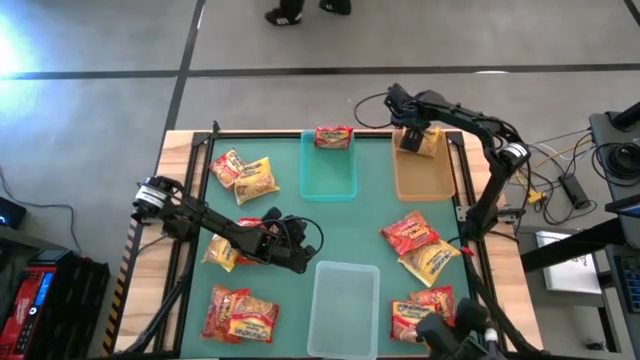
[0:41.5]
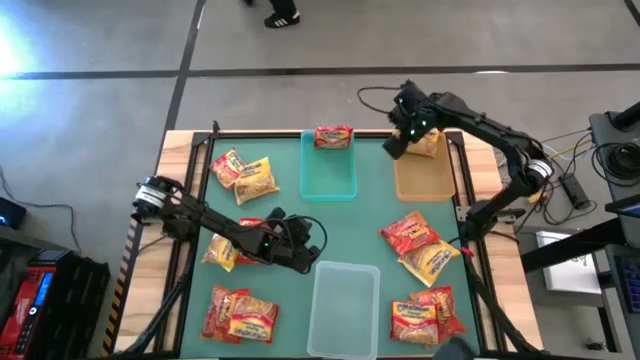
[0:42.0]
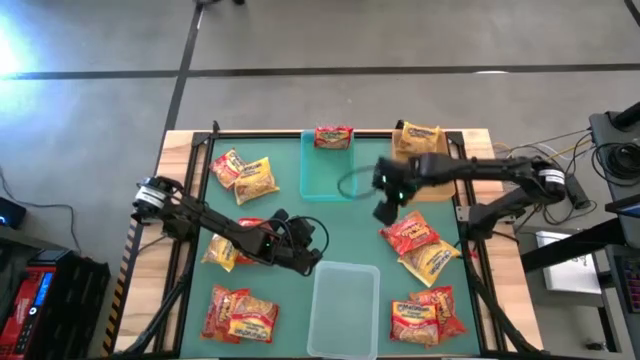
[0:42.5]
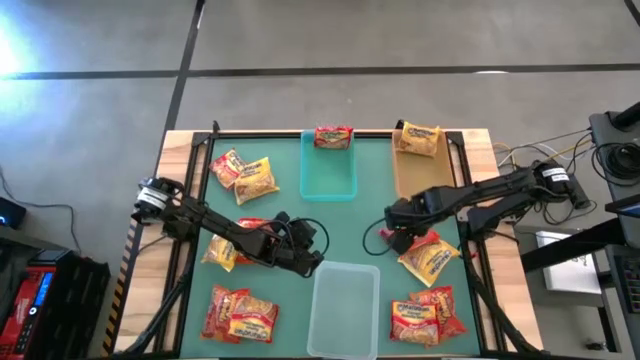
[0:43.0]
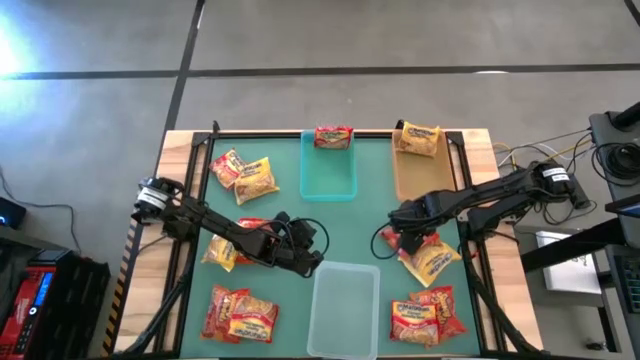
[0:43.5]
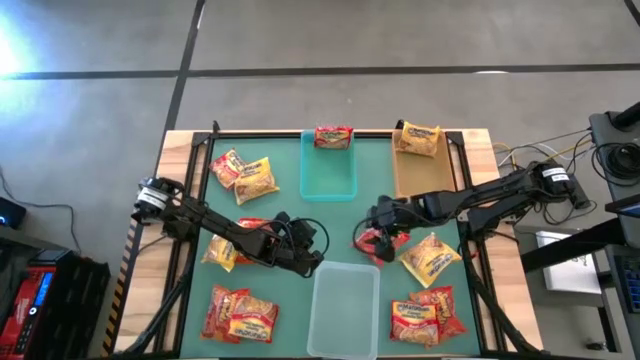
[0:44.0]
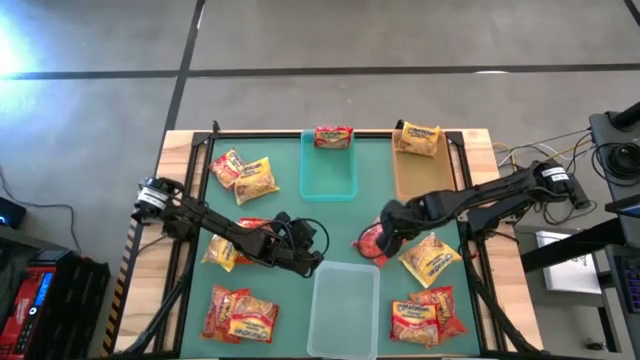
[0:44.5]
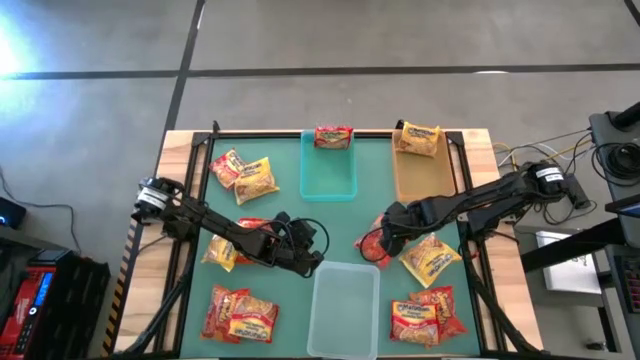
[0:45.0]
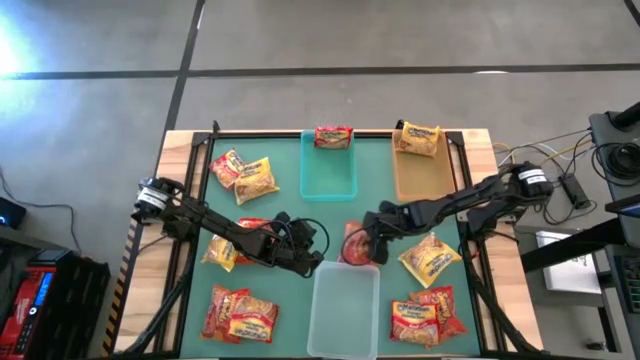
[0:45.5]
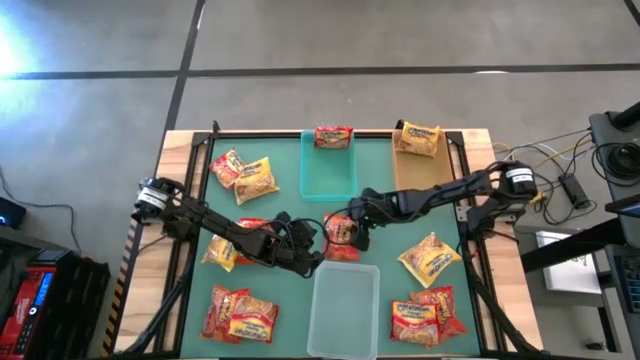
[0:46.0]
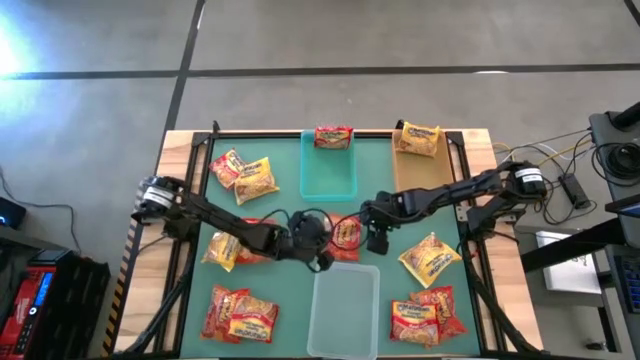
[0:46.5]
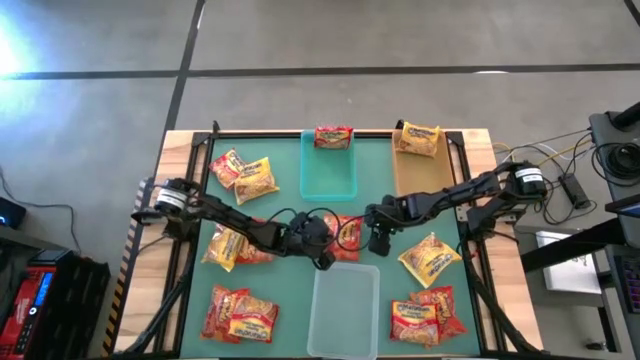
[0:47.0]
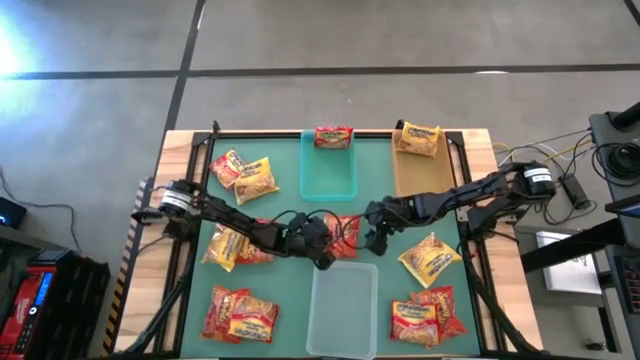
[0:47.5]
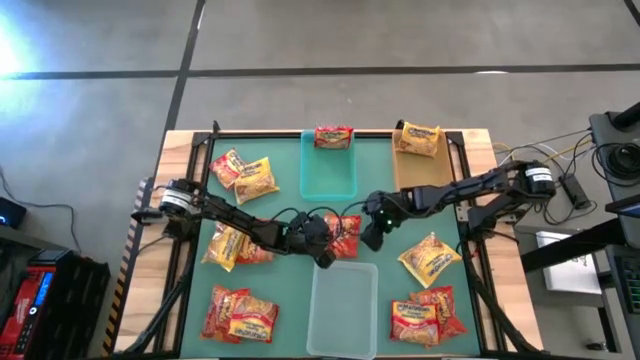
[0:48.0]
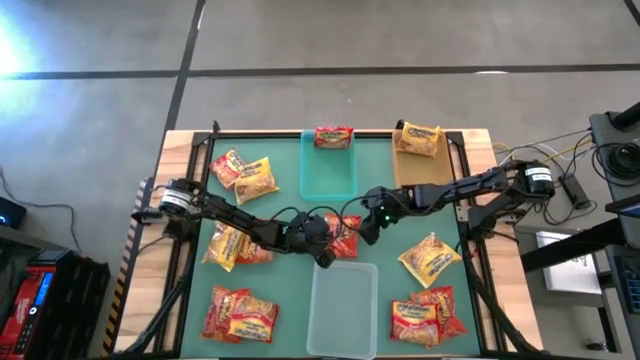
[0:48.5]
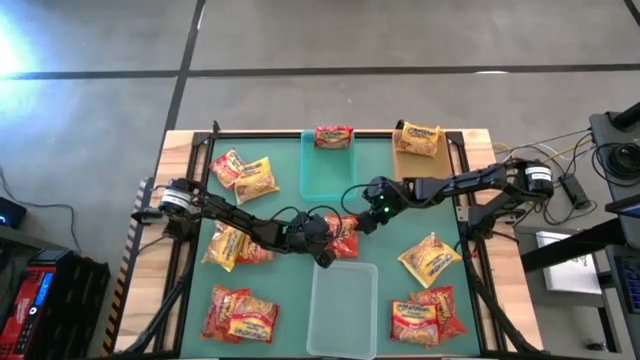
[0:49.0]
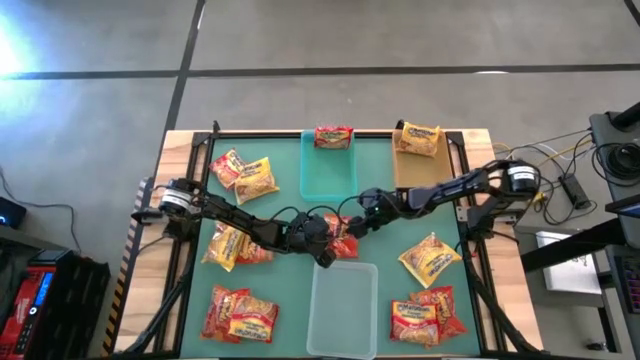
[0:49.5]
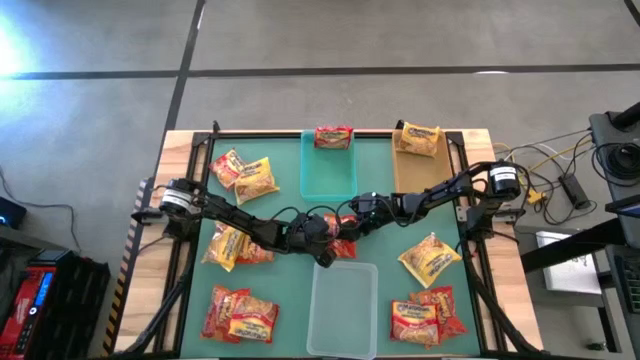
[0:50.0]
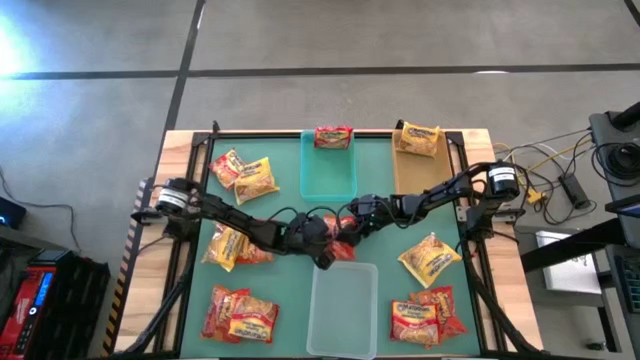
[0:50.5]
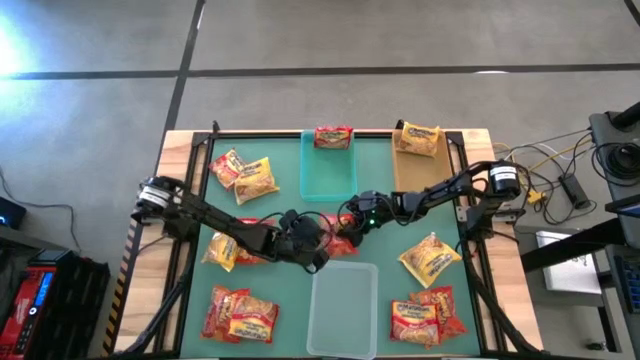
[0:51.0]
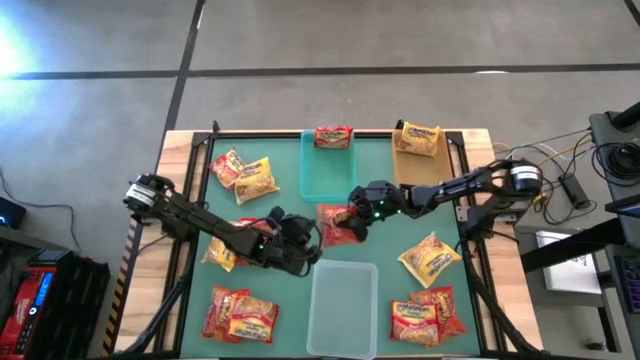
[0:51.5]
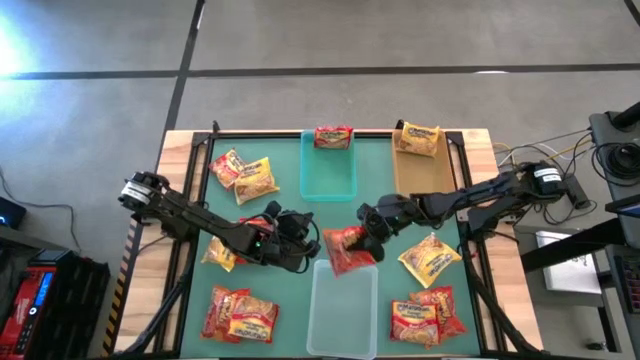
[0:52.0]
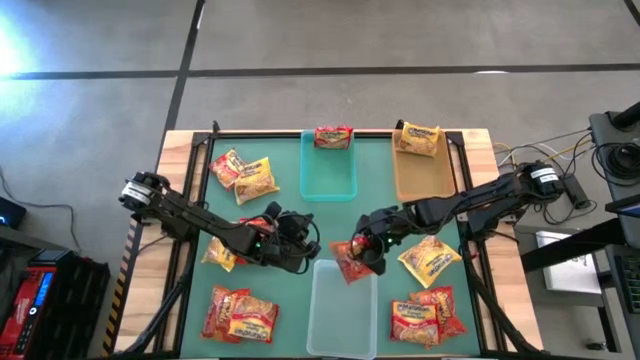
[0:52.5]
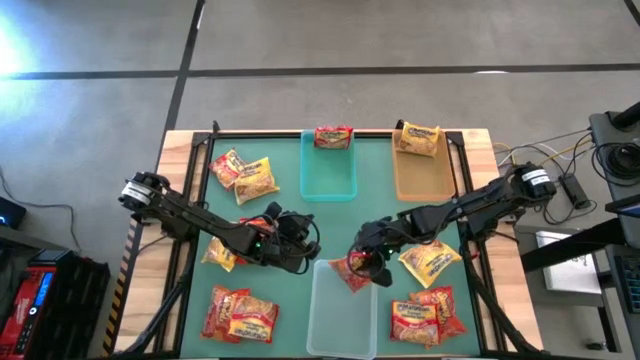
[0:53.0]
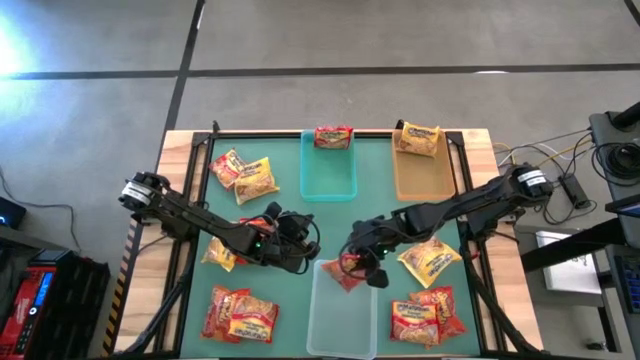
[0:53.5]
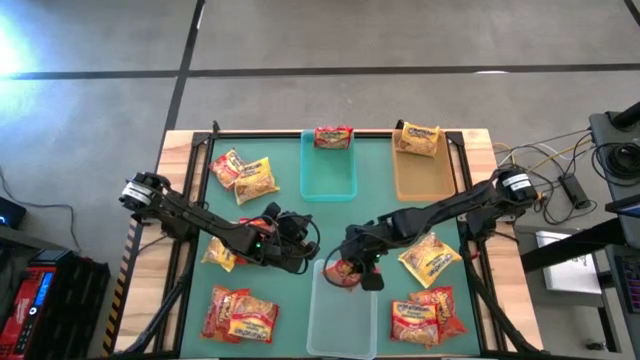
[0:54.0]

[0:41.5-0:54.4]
Task: Sort Maruchan noodles
Put the top right orange noodle pack into the transparent bin

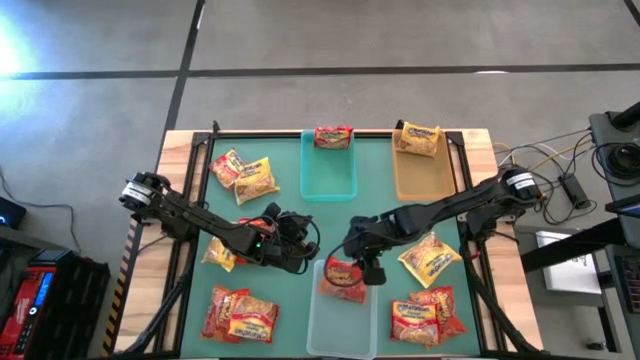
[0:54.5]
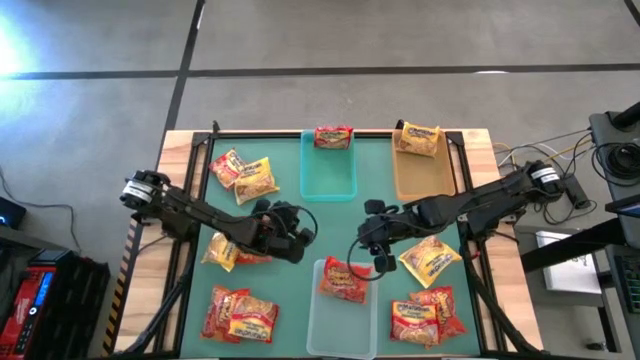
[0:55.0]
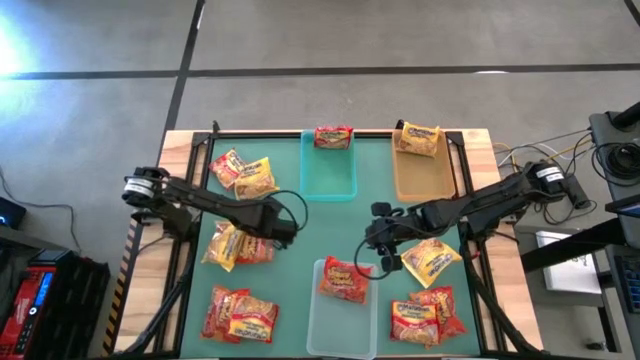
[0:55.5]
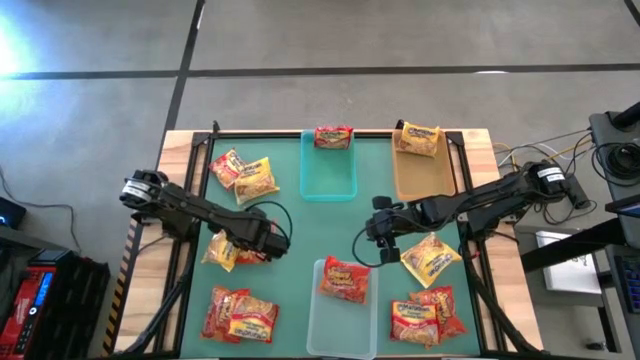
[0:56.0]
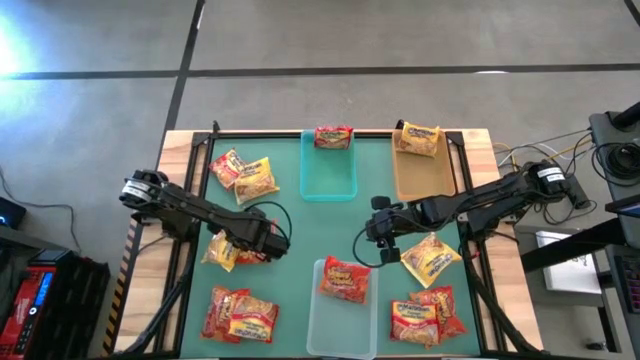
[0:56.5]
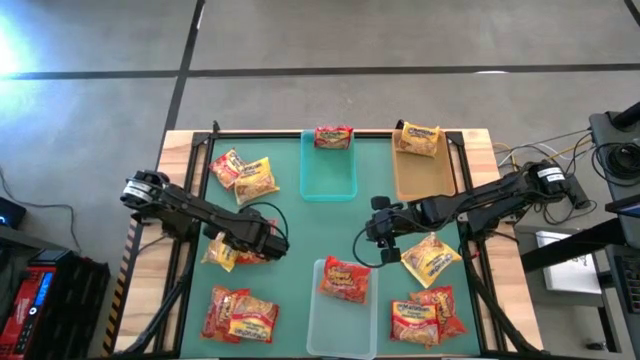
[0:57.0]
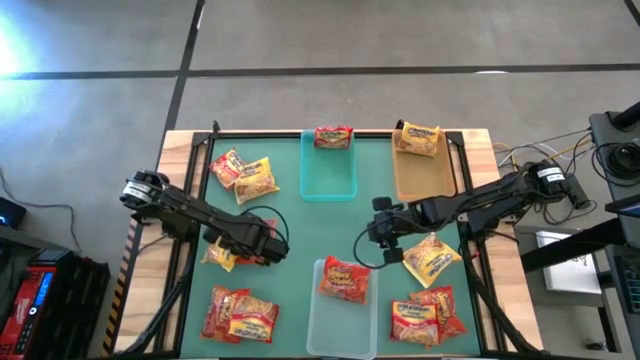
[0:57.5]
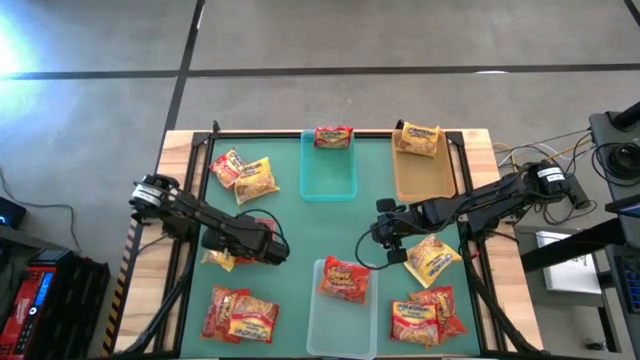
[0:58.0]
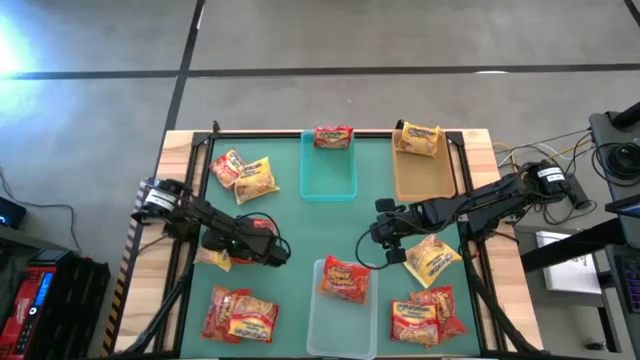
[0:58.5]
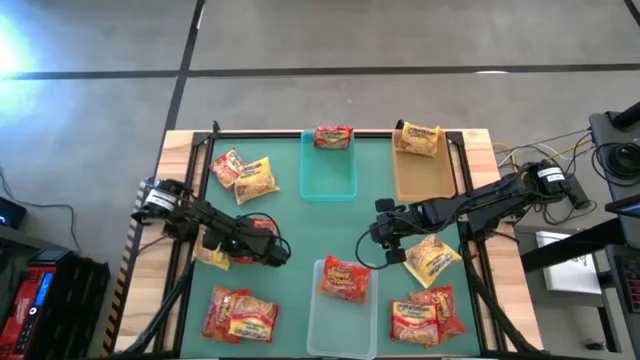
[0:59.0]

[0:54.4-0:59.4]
Put the right yellow pack noodle into the yellow bin

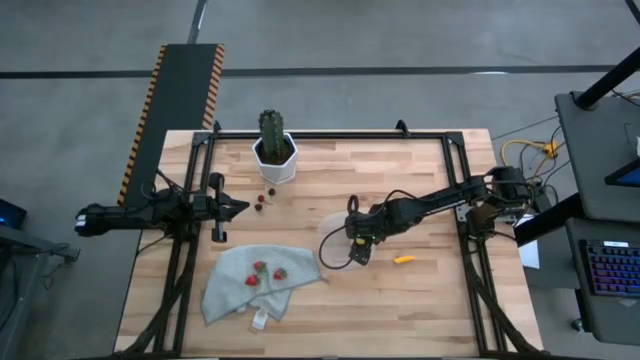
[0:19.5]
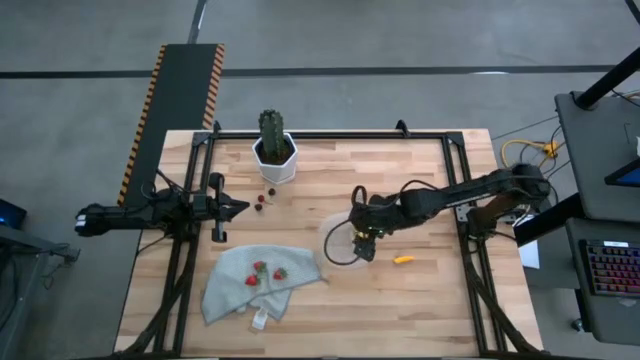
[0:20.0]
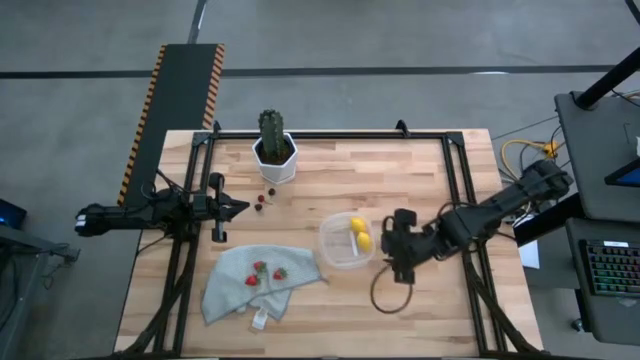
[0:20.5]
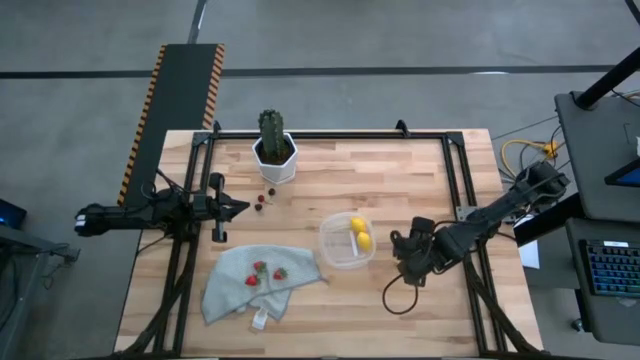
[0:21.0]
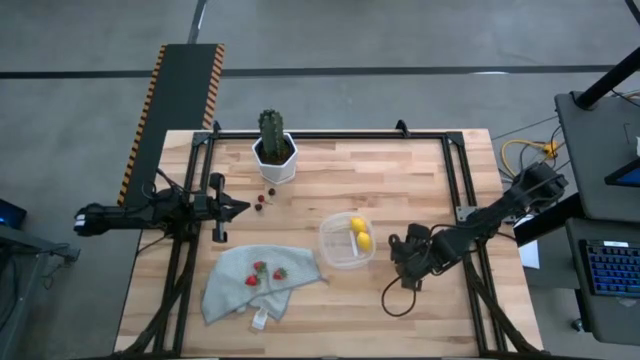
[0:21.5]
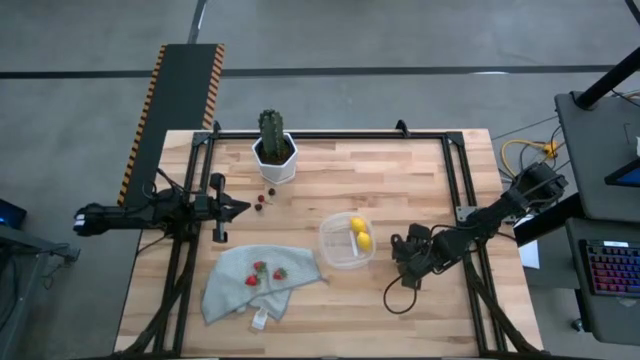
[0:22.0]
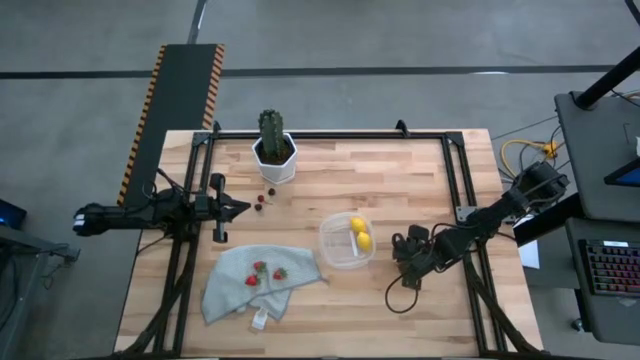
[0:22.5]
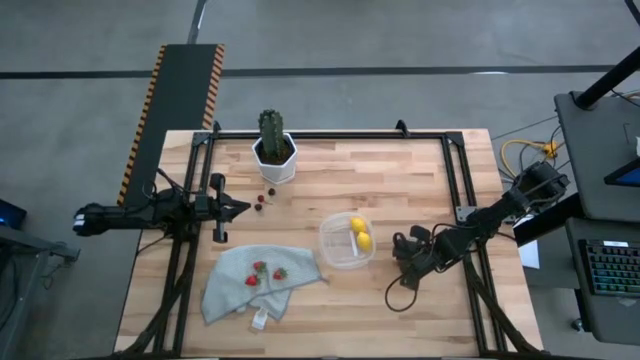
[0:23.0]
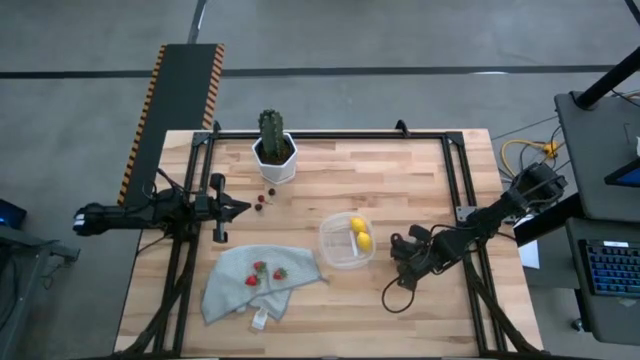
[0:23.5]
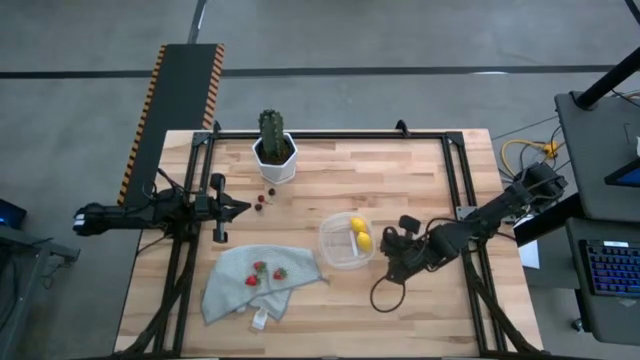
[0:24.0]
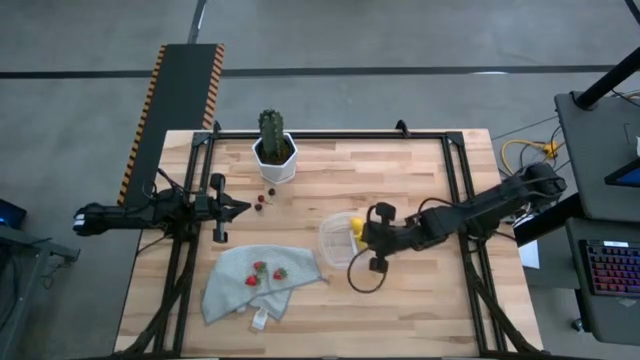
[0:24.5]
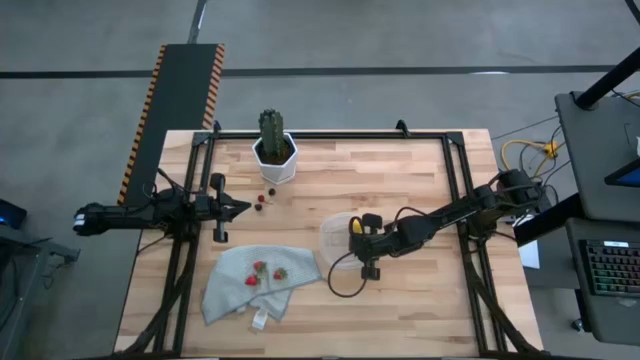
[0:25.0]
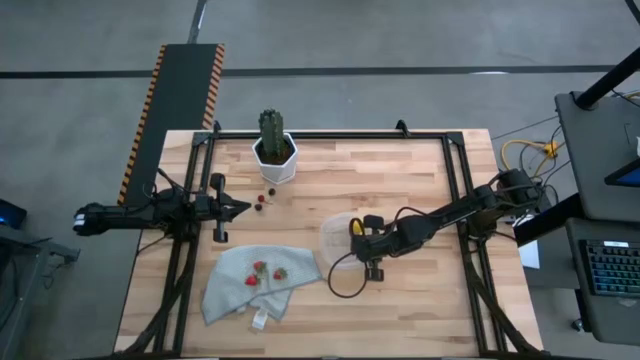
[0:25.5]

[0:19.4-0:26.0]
Task: Pick and placing Produce into tupperware
Put the yellow corn into the transparent container
